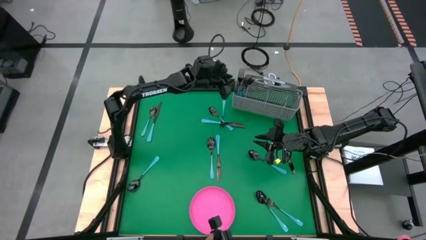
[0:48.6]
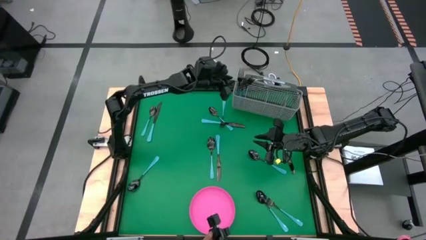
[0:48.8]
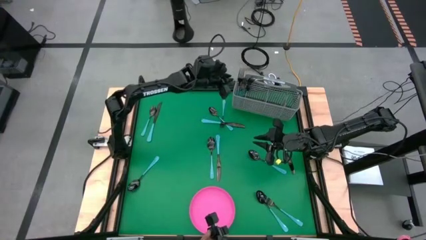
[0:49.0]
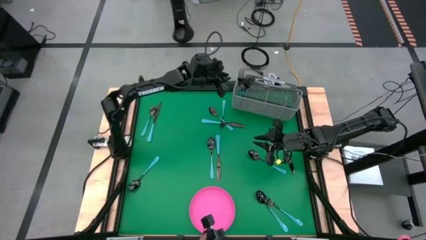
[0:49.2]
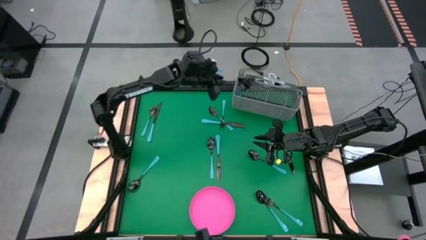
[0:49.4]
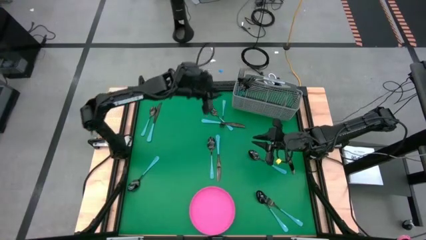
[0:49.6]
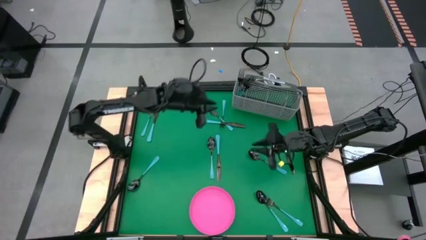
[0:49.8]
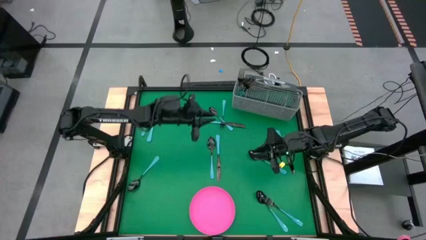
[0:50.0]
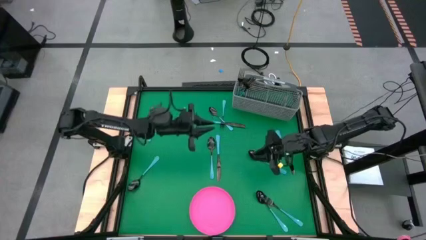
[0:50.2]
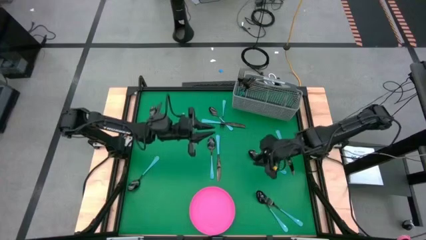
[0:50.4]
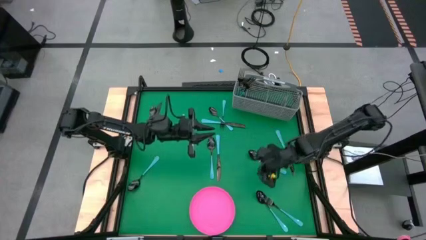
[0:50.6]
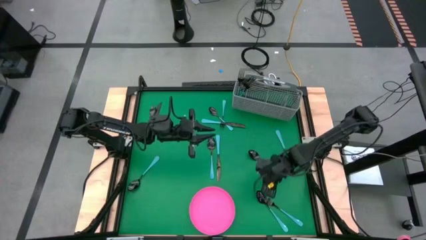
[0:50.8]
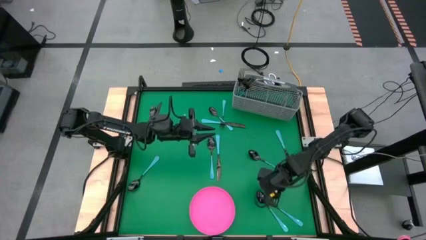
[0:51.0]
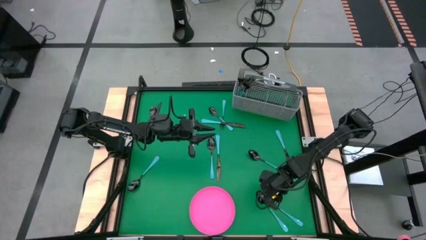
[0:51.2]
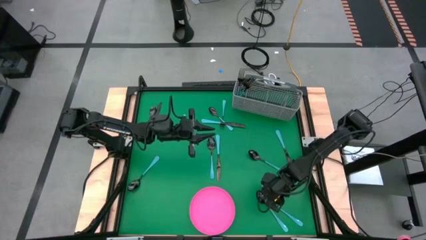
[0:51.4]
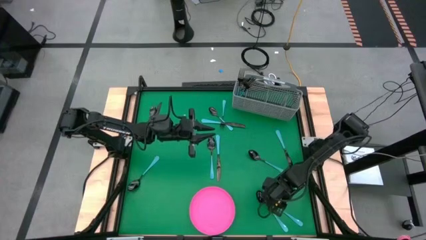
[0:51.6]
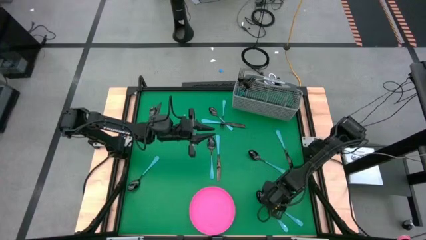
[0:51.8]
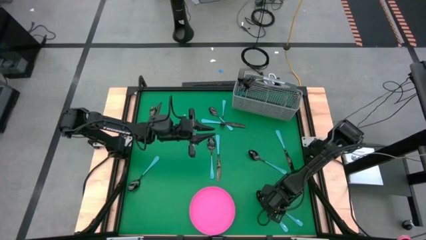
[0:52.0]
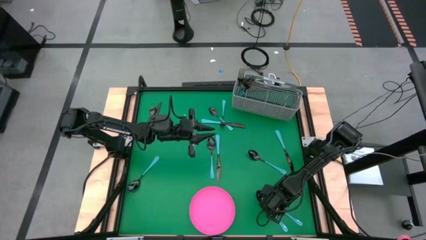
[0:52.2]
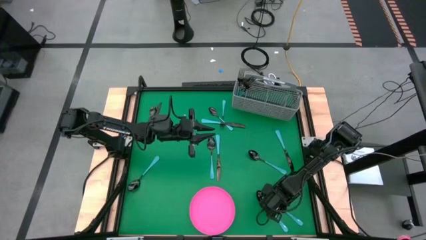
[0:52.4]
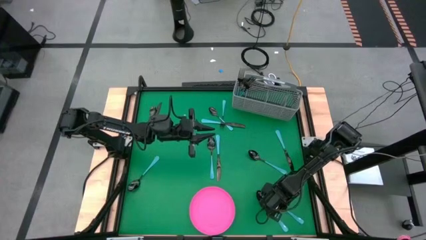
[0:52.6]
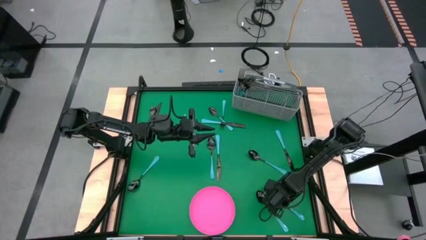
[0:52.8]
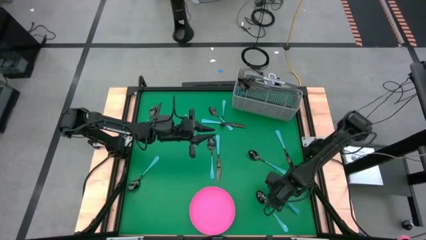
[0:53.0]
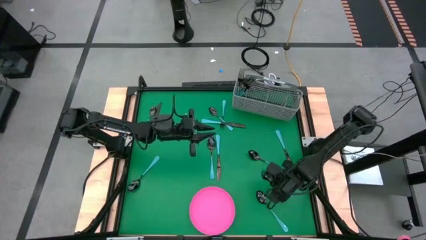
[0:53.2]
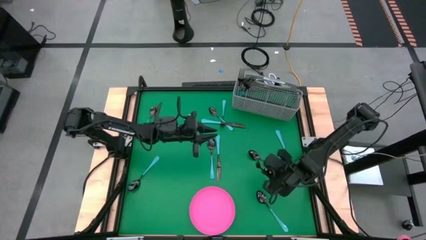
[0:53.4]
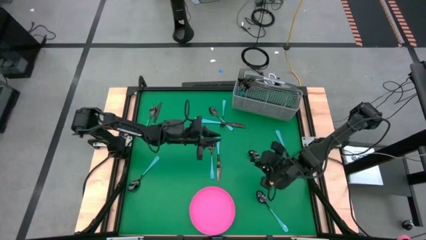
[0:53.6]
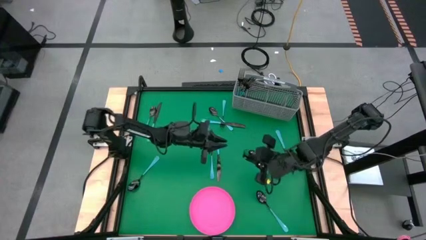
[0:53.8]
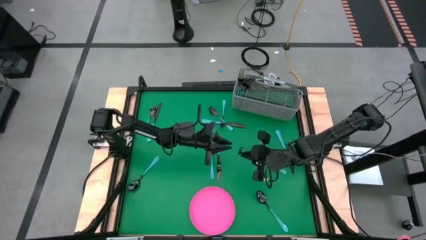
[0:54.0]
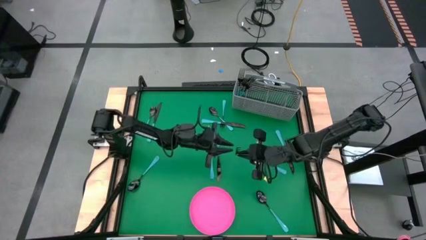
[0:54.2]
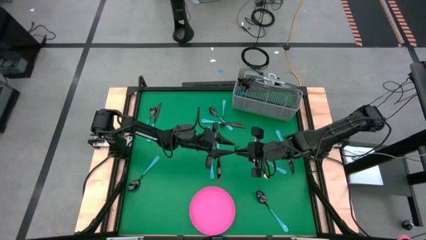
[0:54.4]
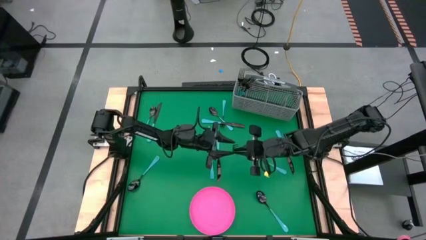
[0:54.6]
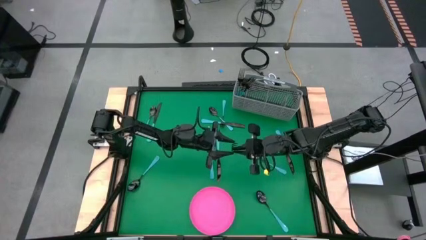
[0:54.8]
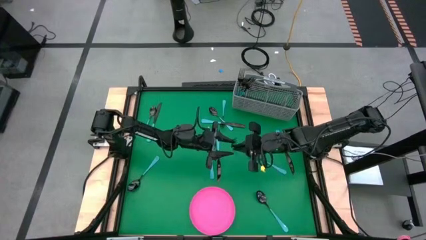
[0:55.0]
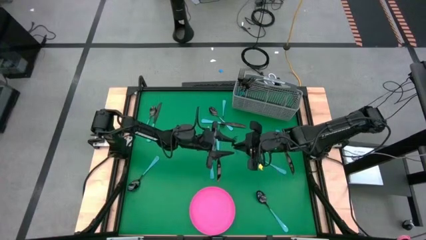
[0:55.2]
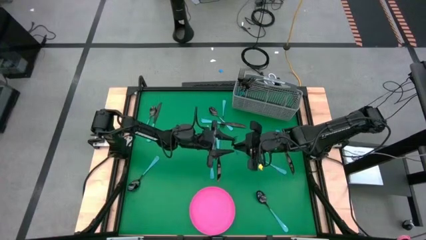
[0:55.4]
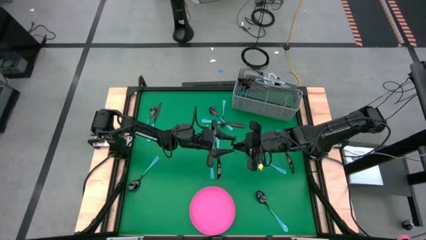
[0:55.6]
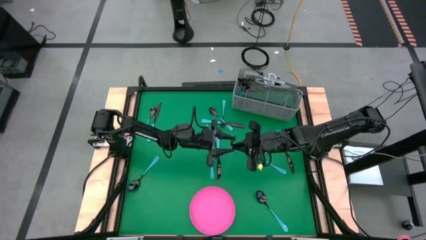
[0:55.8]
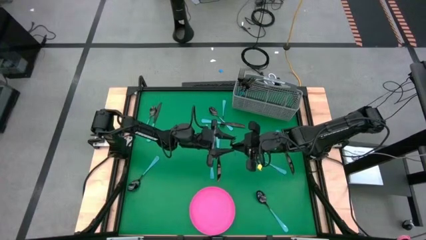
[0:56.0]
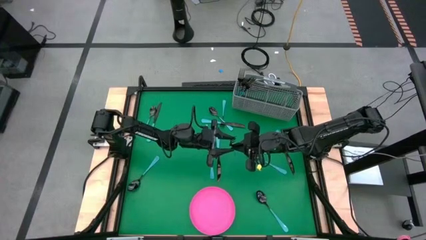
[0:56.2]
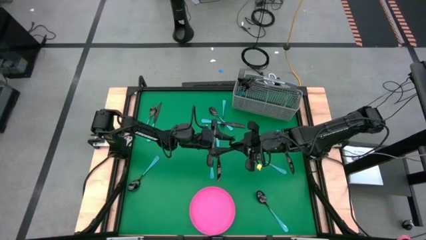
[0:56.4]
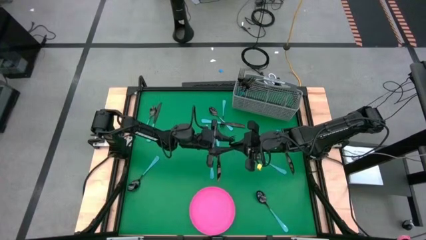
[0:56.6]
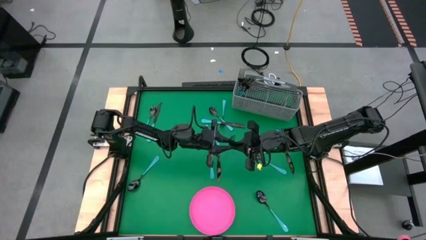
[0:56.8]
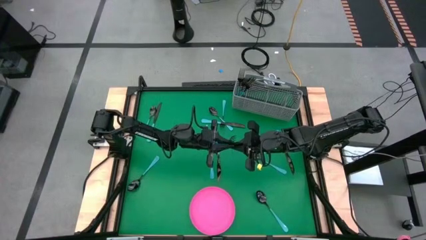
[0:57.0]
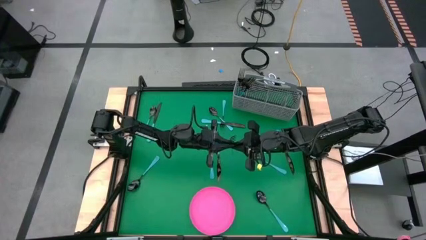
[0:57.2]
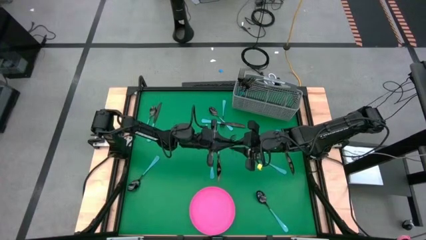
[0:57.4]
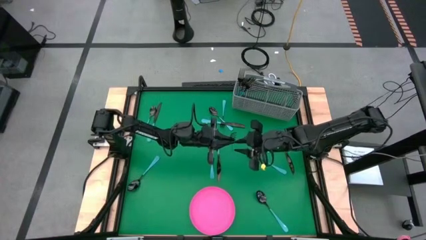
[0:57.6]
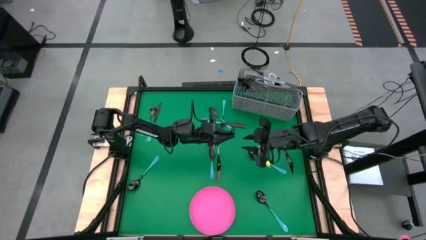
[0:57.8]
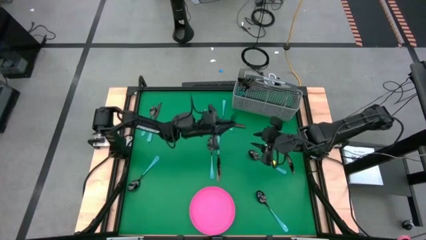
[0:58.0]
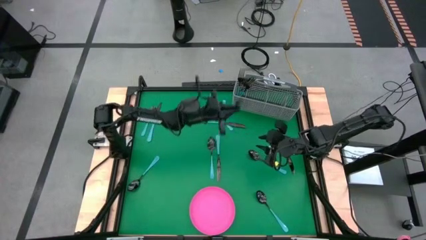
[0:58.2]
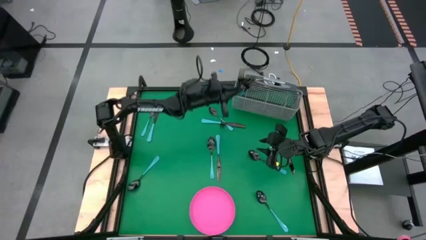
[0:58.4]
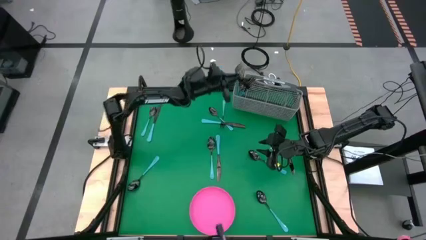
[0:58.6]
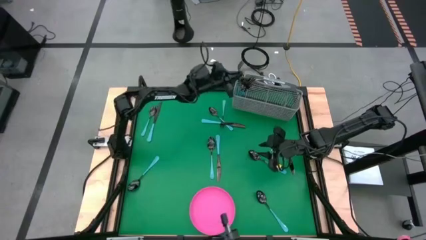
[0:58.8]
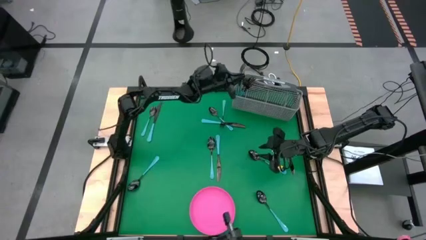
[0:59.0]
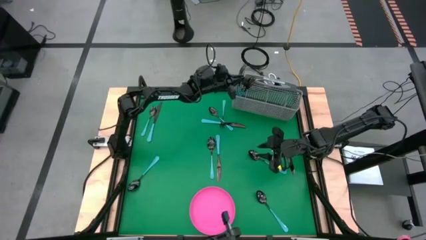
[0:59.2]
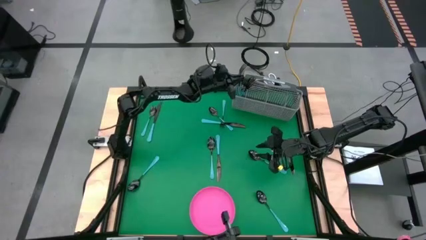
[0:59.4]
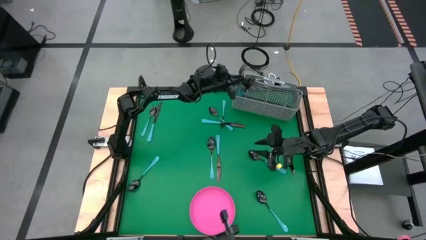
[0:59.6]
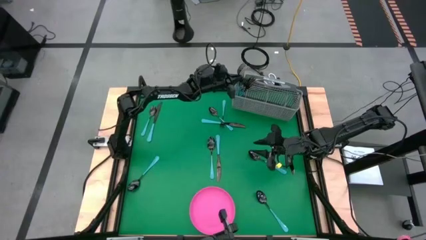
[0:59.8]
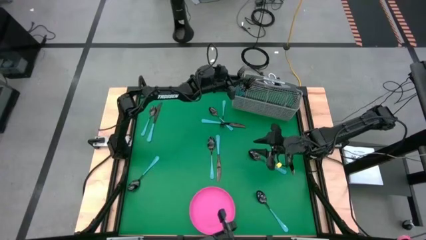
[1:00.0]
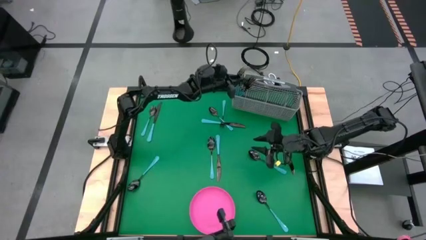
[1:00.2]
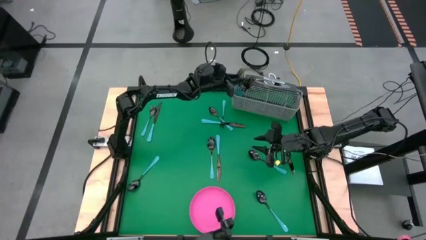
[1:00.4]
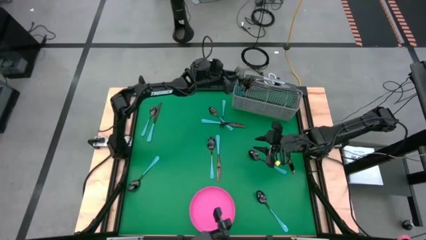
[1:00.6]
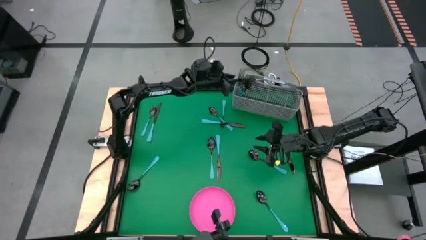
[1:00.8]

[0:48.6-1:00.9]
Task: Sort silverware
Put the blue fork into the utensil holder

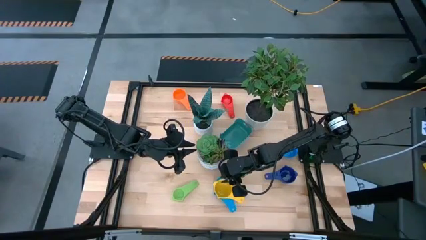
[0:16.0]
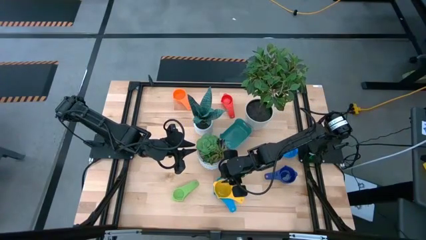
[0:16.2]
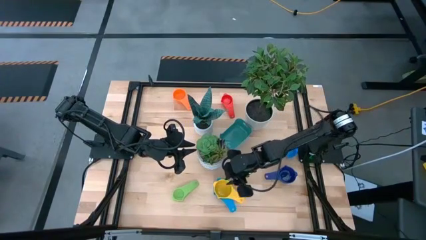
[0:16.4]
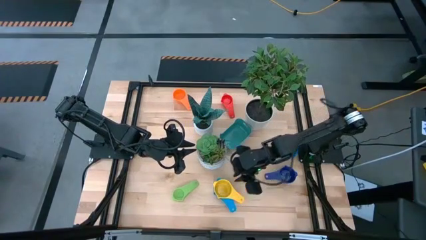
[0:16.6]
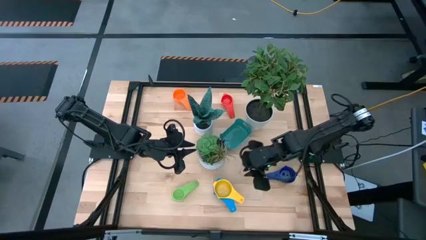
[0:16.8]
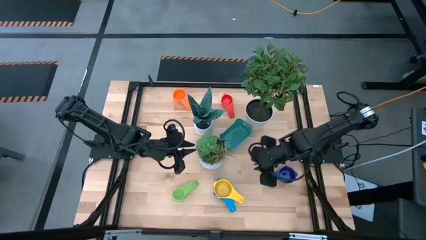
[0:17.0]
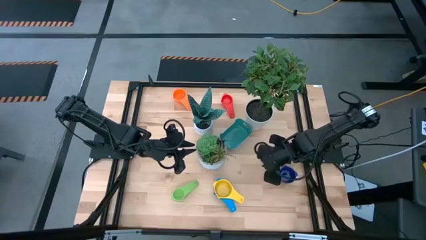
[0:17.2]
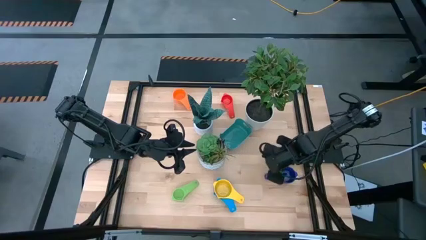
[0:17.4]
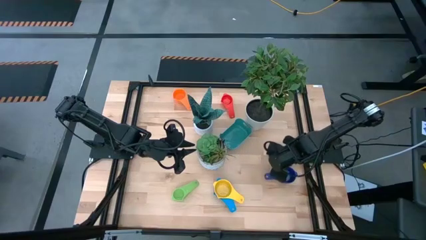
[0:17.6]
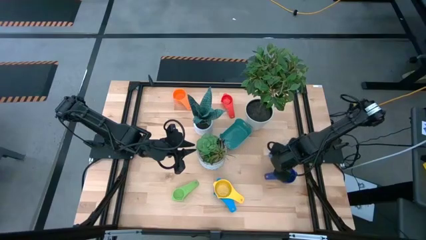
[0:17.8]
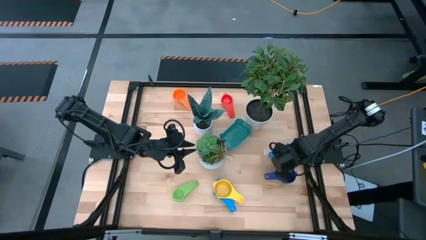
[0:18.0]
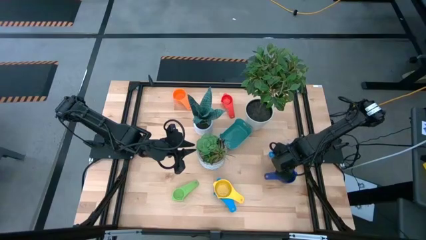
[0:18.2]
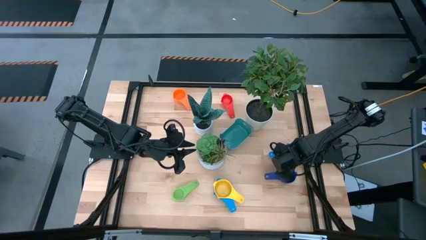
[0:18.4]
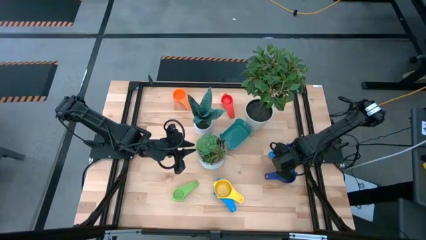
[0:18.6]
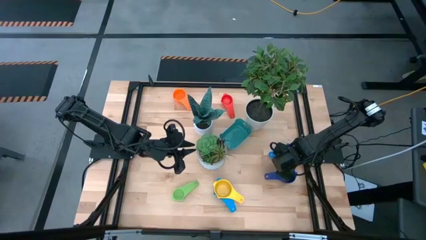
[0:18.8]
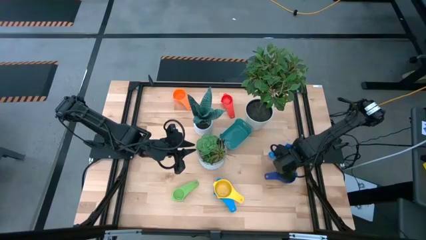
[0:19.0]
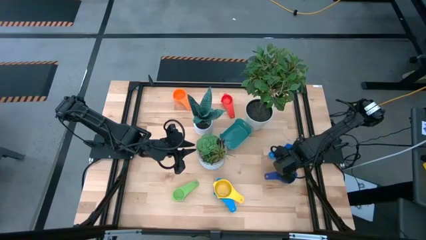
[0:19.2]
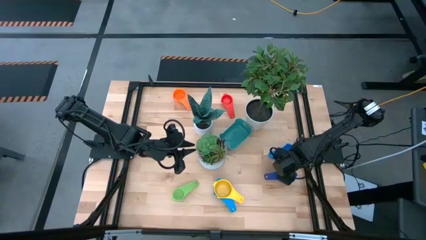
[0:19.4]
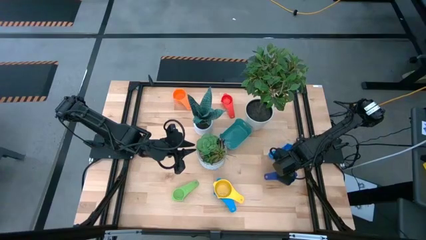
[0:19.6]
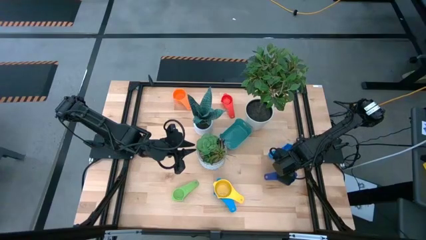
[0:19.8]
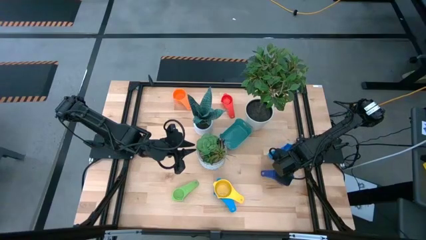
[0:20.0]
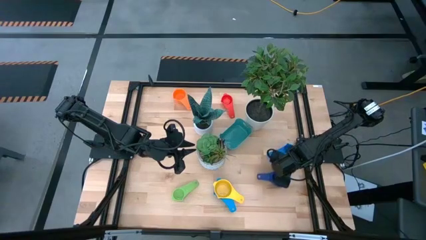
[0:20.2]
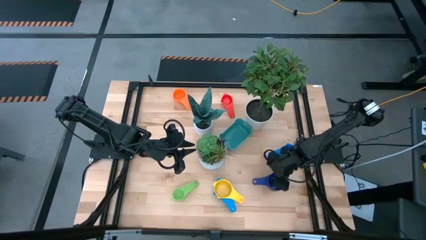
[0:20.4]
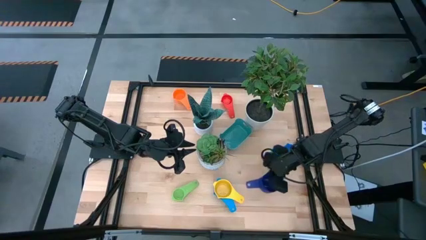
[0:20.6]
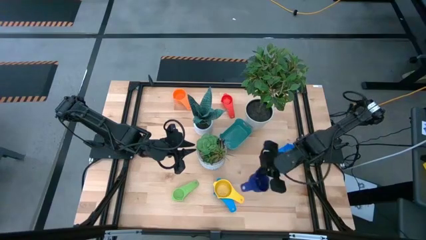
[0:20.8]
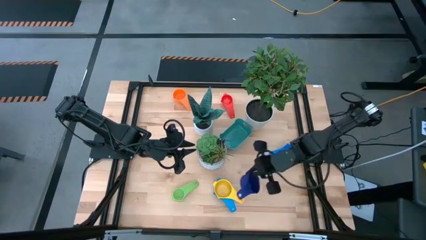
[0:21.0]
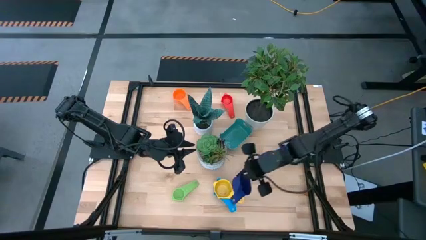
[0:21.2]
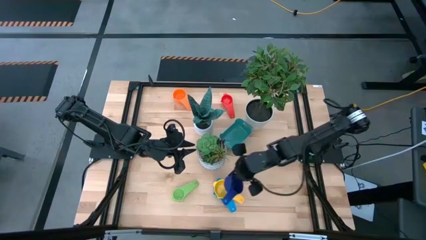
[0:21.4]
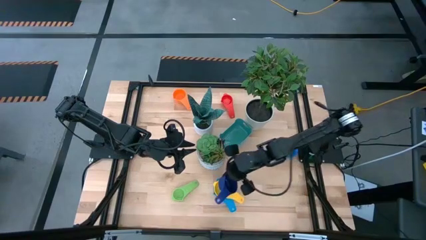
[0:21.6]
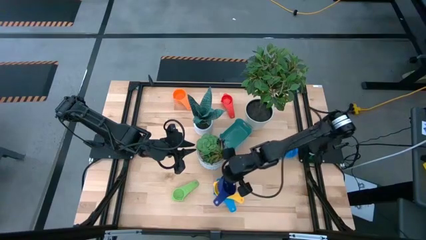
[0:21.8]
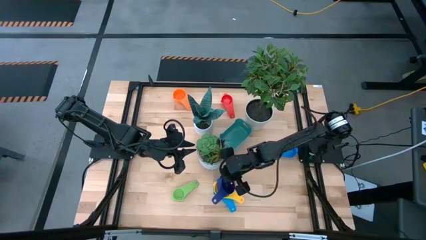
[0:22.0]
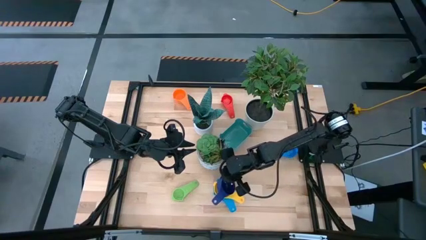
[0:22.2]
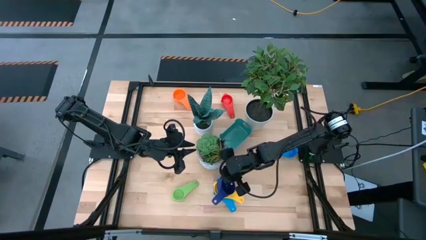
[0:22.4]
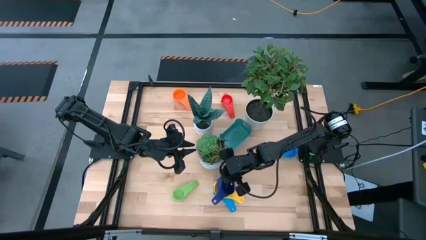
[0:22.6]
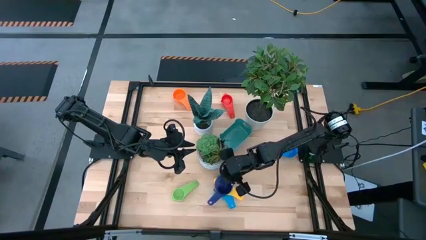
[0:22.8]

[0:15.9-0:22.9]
Task: Nest measuring cups in basket
Stack the purple measuring cup on top of the yellow measuring cup
